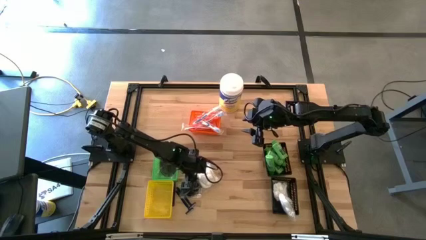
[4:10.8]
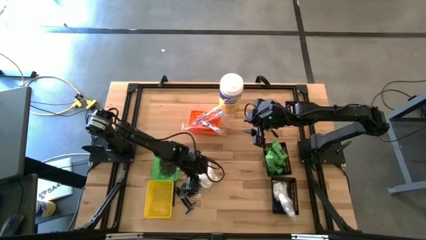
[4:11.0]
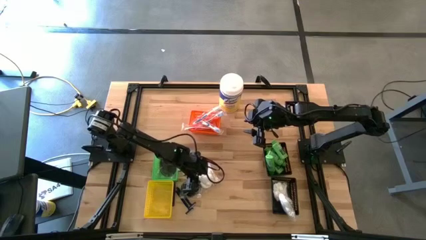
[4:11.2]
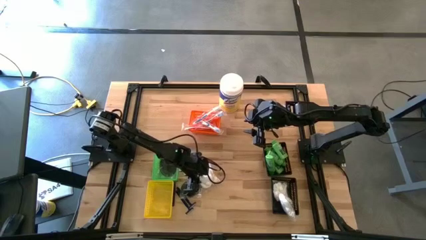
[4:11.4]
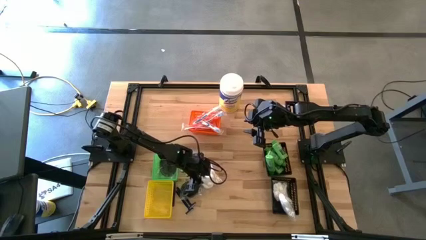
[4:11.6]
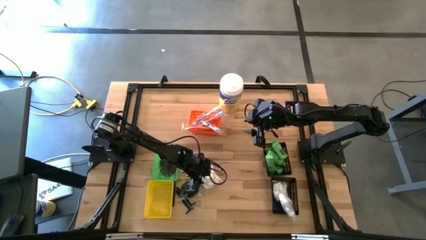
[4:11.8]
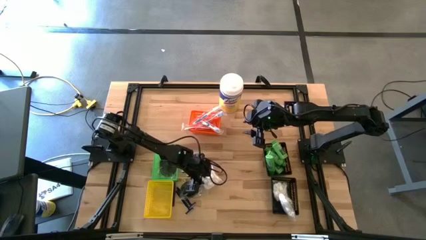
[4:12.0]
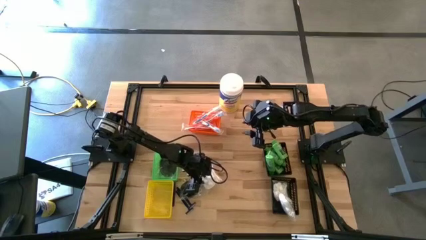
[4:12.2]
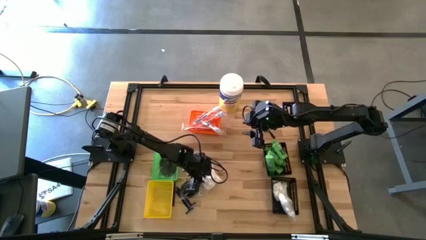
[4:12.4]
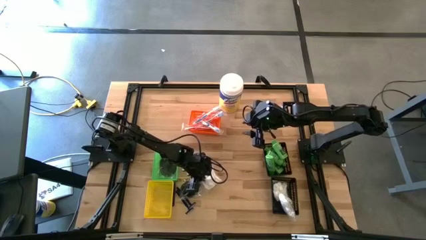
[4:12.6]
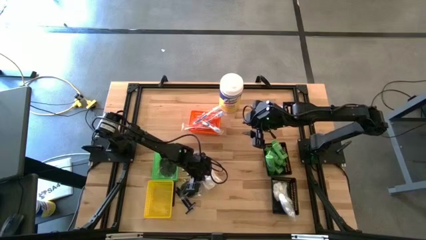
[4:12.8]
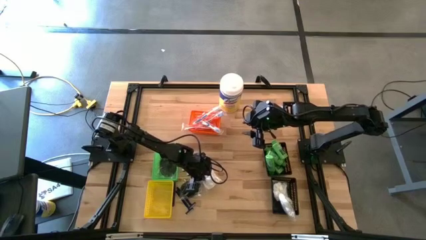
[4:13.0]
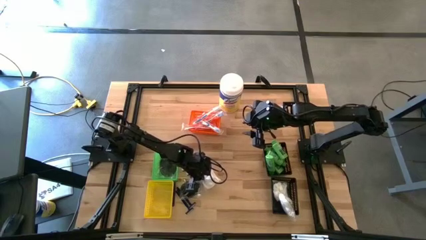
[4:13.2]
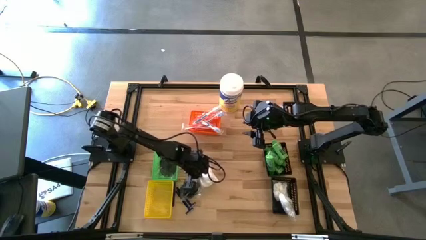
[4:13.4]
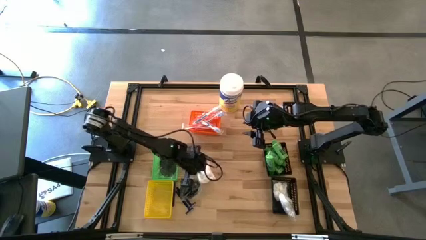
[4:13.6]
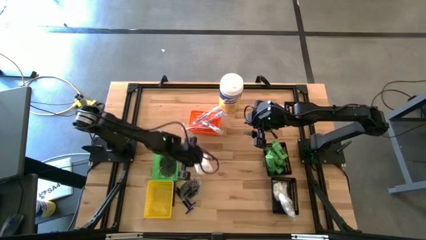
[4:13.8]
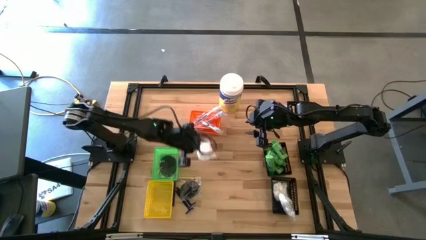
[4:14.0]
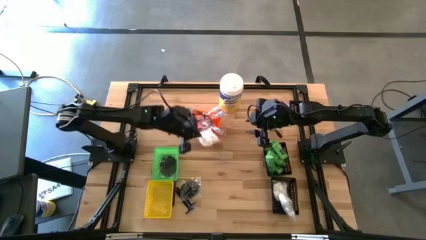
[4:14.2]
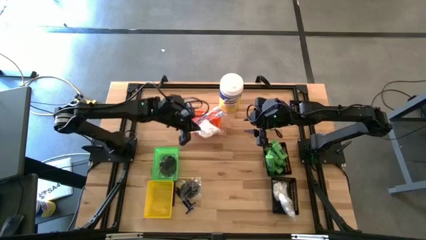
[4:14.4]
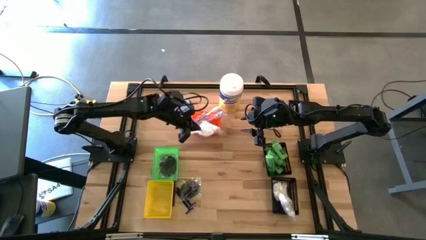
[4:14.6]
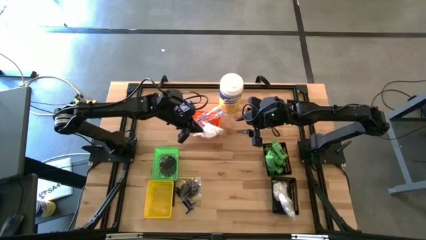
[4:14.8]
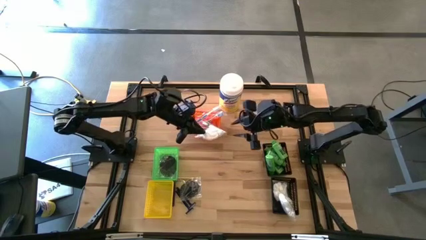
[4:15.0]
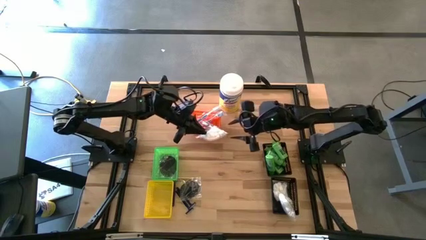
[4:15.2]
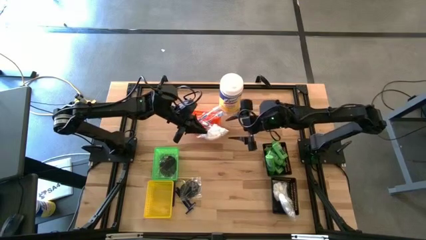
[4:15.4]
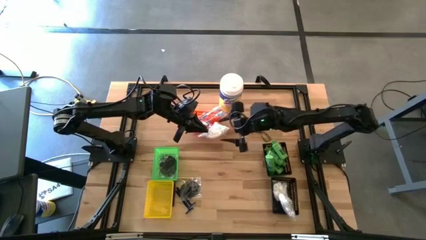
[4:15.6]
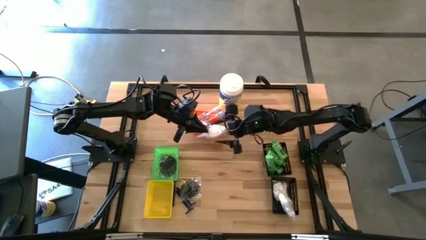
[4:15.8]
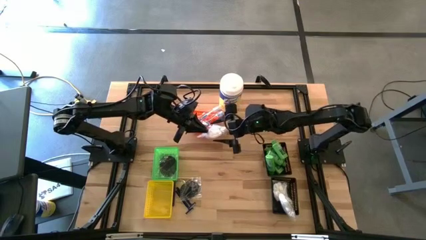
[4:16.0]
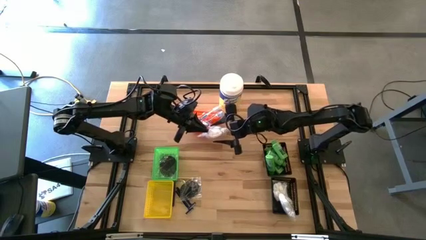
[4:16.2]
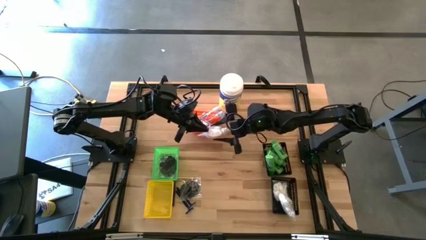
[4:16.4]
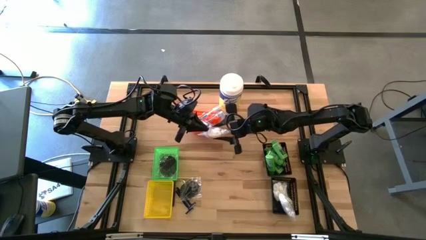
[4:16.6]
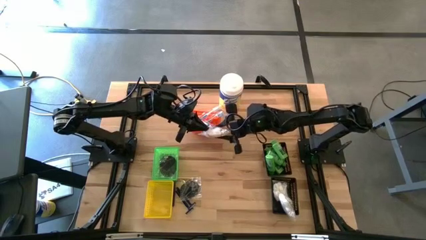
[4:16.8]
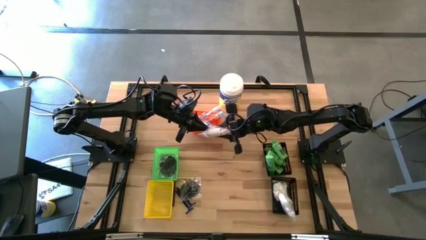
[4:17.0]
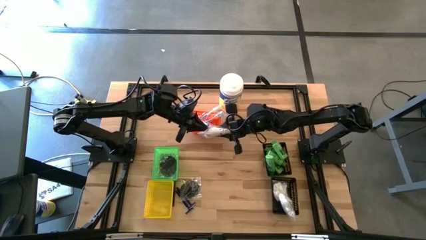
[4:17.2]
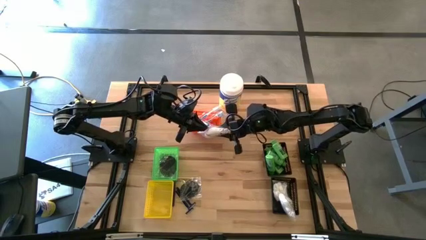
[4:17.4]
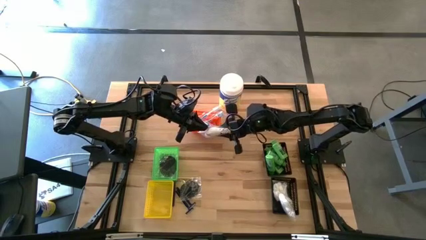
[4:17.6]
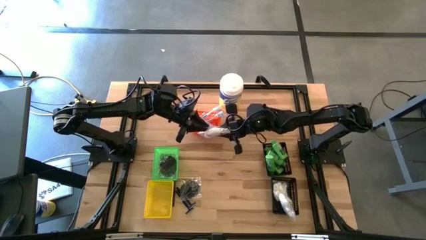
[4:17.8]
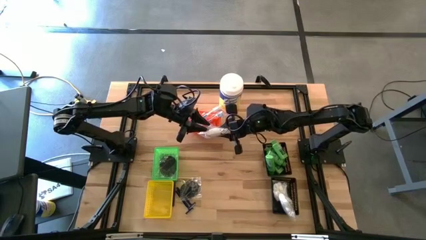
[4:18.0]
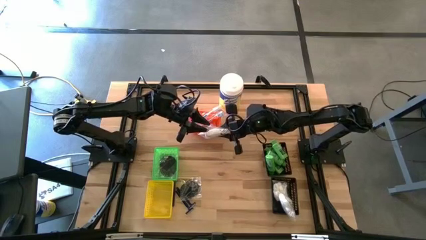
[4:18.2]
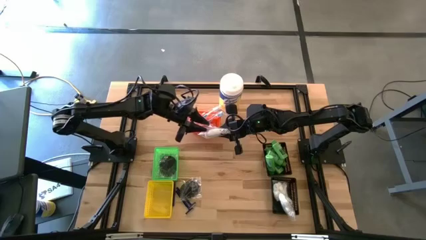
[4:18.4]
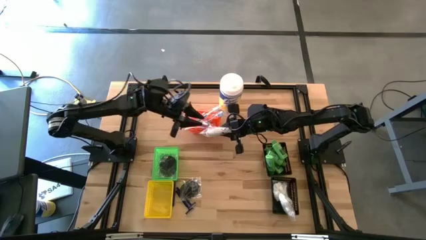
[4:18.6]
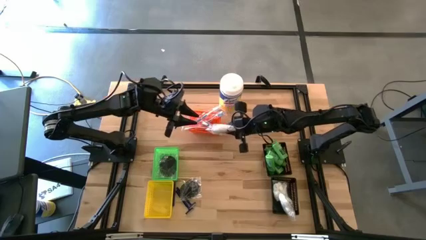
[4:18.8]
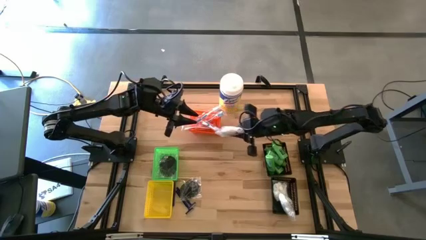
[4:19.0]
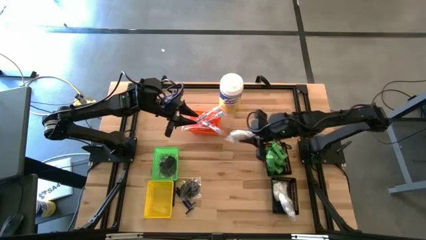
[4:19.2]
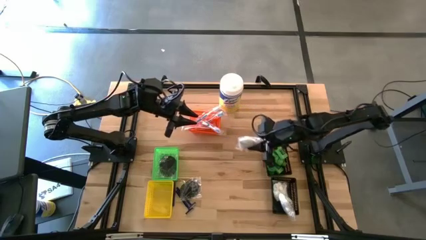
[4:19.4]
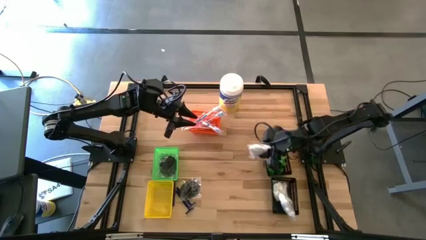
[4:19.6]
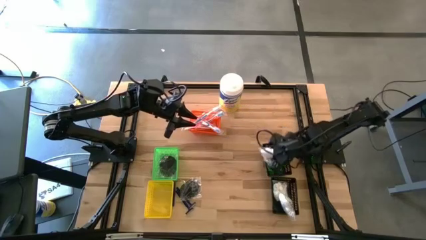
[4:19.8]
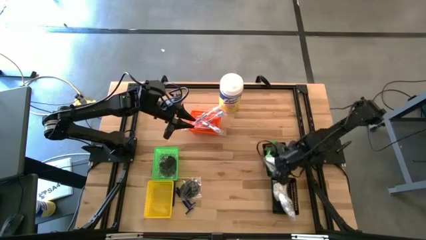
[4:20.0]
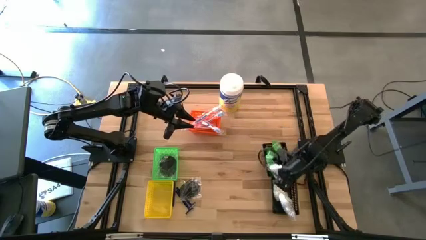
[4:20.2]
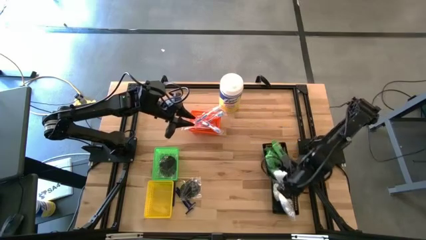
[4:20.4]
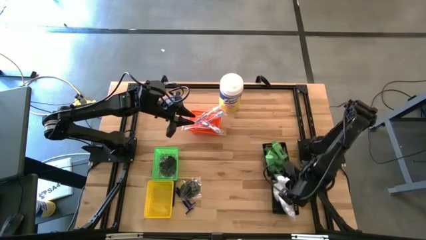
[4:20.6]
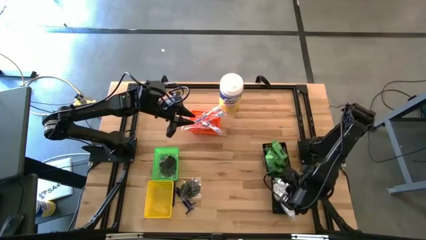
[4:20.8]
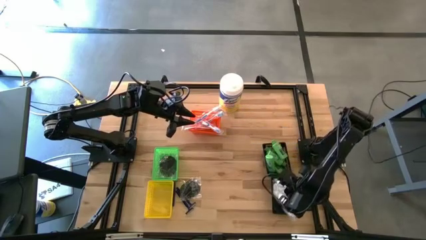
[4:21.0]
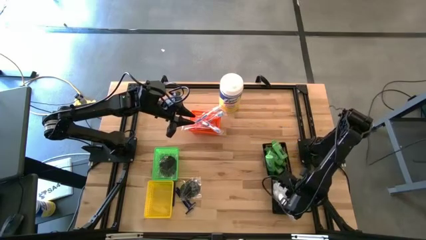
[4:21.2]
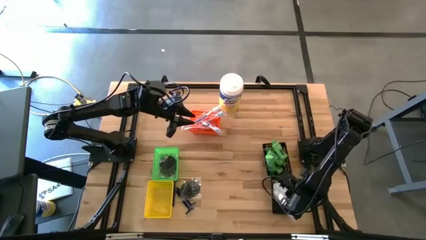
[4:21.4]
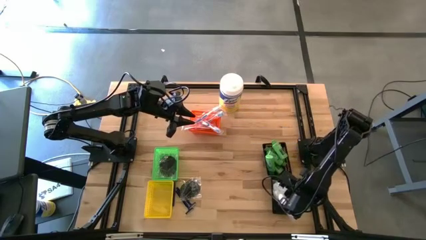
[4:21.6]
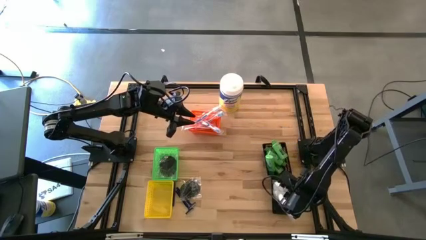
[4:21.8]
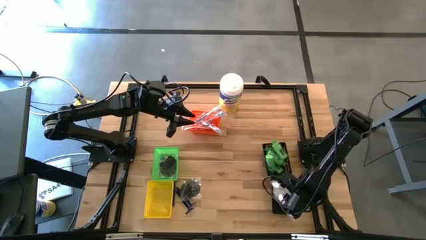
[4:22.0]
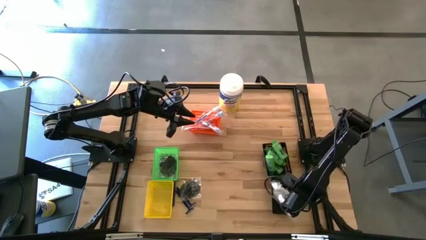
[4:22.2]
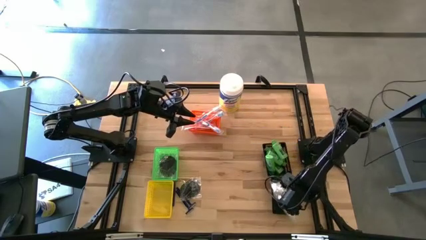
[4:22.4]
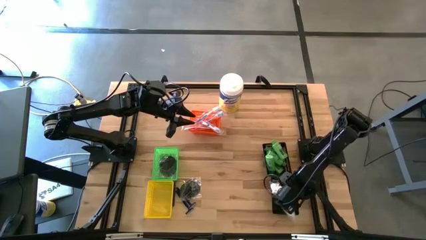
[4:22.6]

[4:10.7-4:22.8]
Task: Pick & Place Travel size toiletries
Put the white cotton pack into the bottom black bin

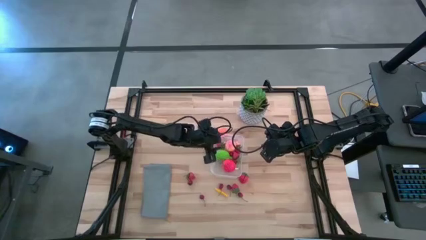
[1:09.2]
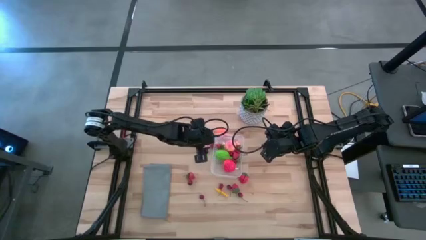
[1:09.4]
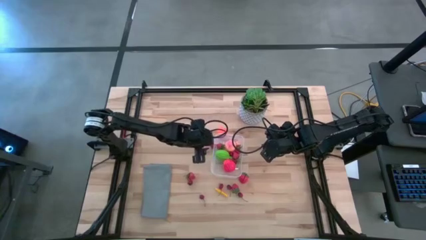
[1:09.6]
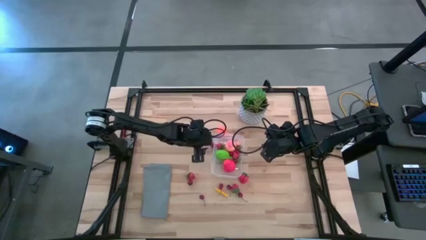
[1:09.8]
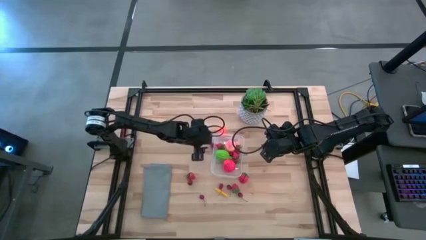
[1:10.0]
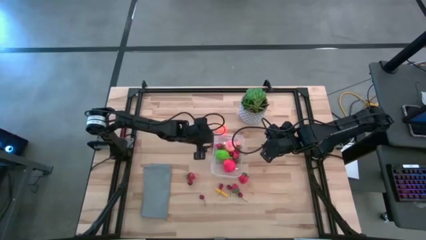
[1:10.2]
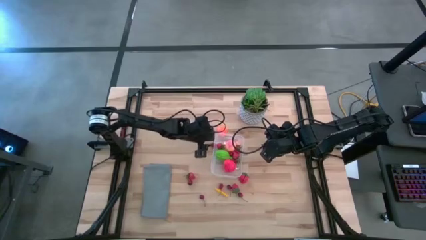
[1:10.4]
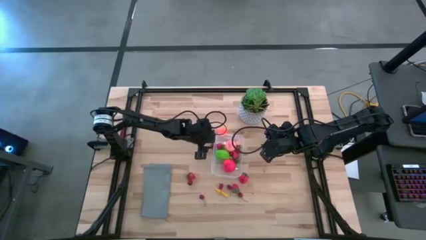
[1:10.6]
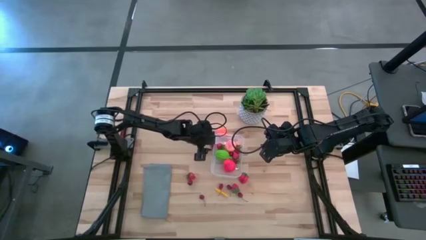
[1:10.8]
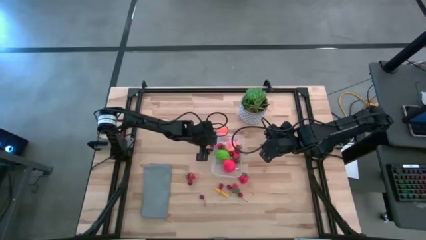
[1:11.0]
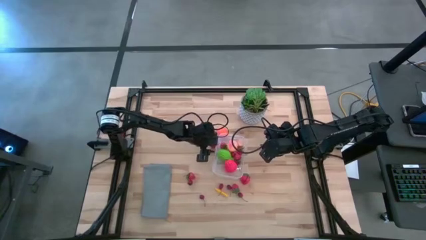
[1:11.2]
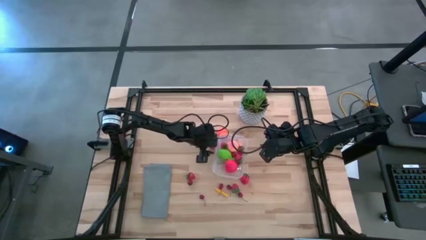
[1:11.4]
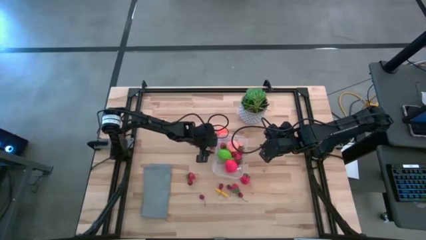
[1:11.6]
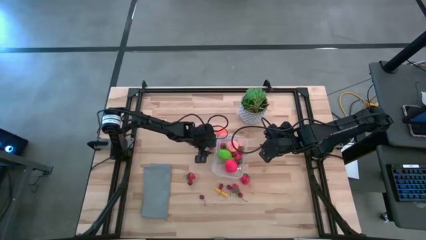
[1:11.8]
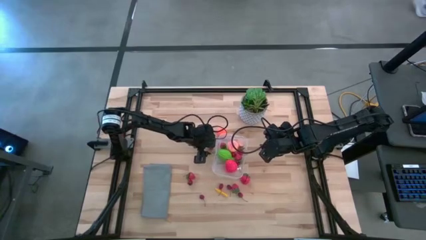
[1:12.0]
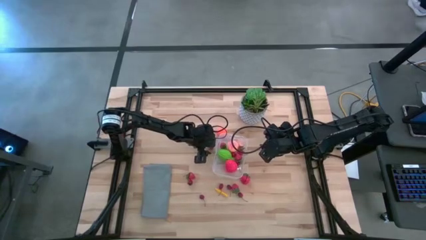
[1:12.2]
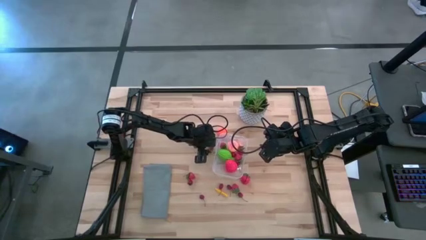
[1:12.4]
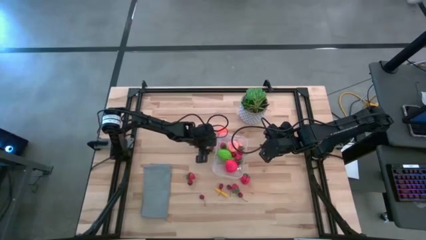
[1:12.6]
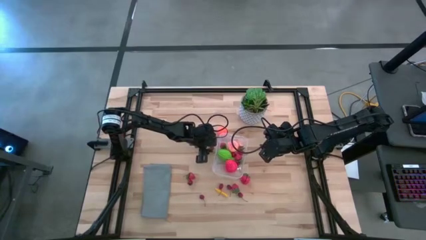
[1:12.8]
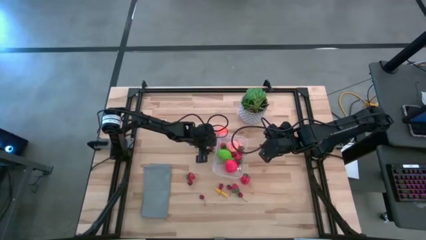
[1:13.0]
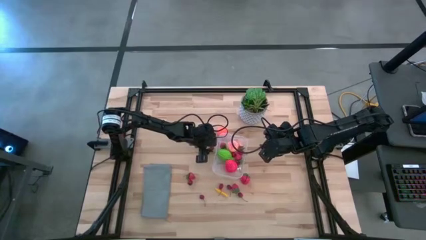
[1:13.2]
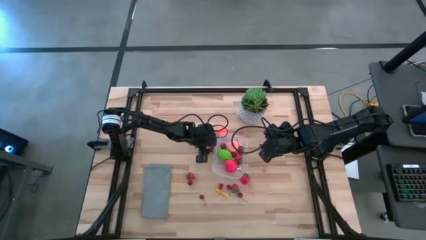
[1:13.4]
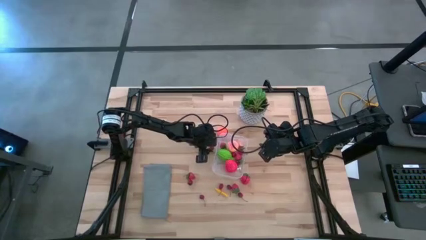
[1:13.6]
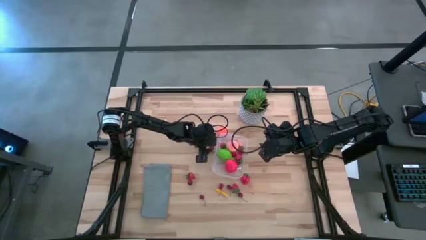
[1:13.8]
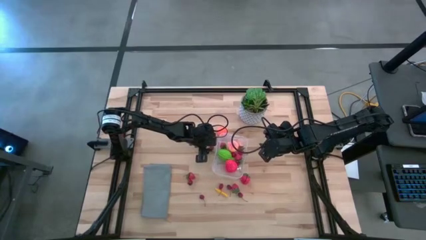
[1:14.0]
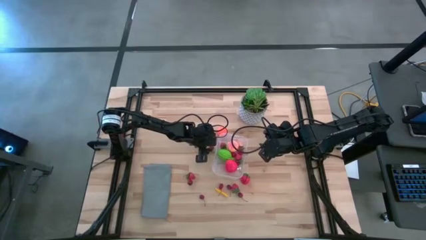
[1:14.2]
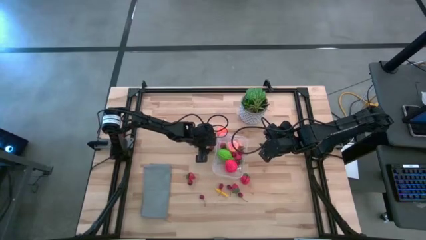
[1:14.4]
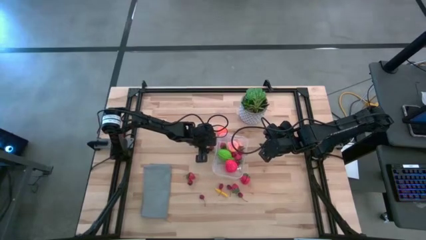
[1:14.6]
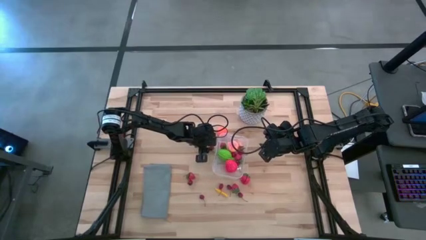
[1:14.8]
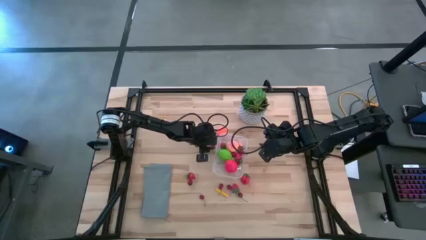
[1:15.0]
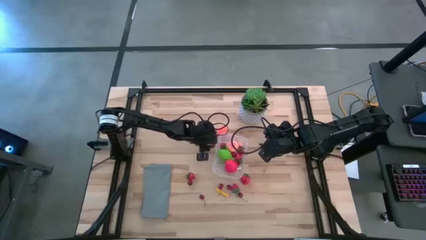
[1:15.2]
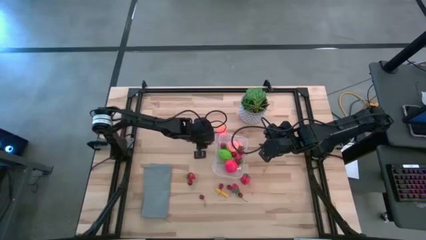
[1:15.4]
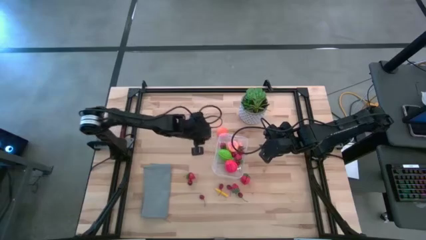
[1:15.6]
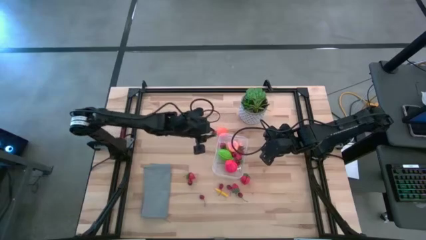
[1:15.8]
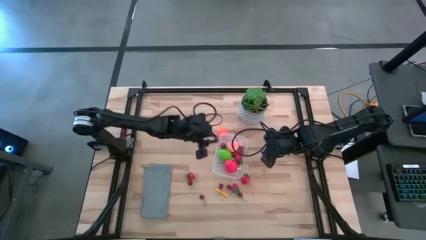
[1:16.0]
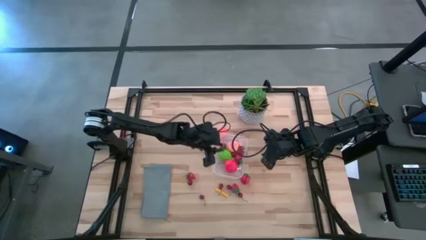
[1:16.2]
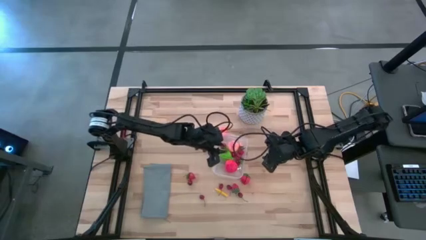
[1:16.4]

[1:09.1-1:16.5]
Task: Pick and placing Produce into tupperware
Put the red strawberry into the transparent bin
